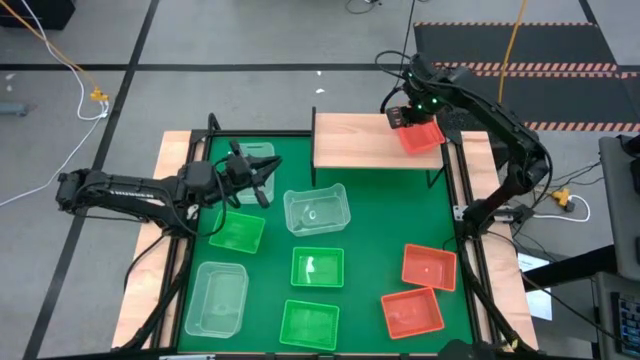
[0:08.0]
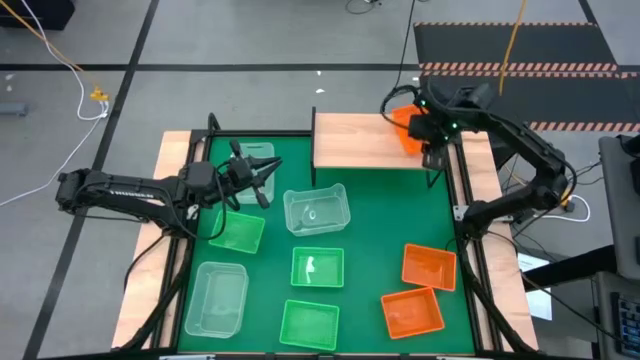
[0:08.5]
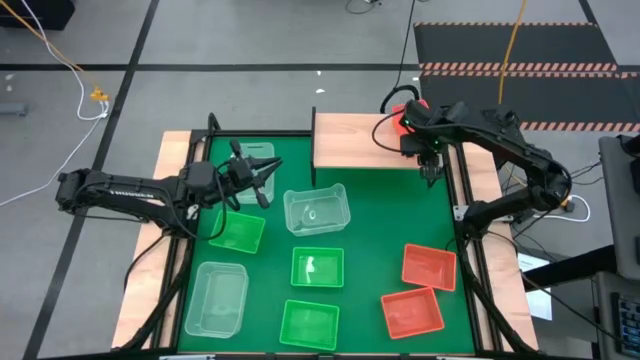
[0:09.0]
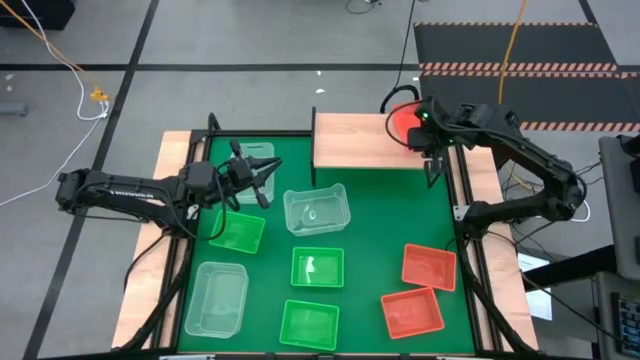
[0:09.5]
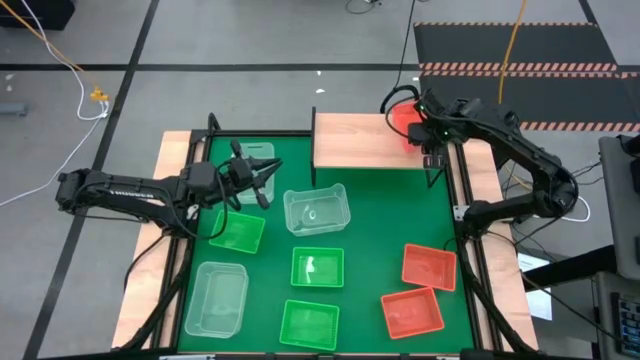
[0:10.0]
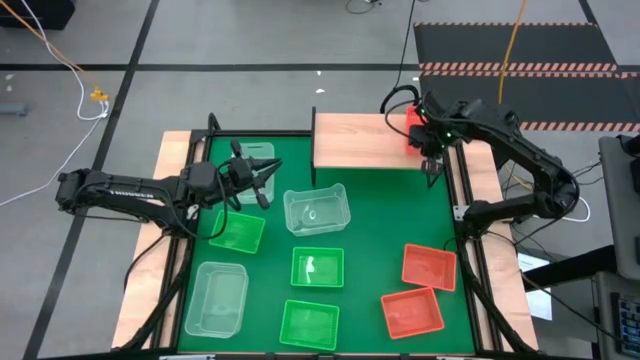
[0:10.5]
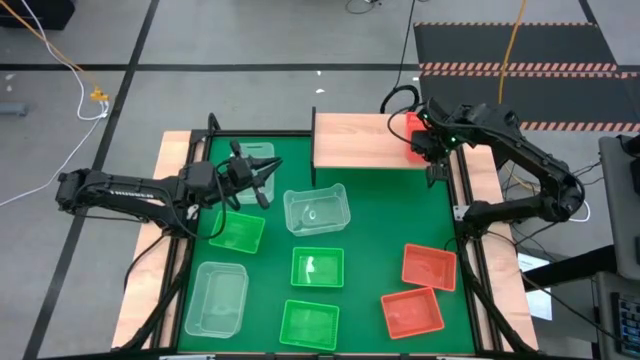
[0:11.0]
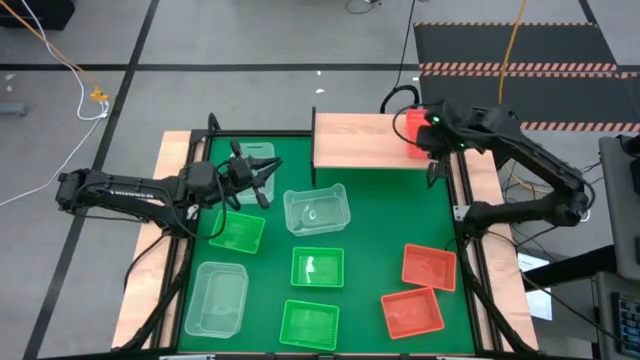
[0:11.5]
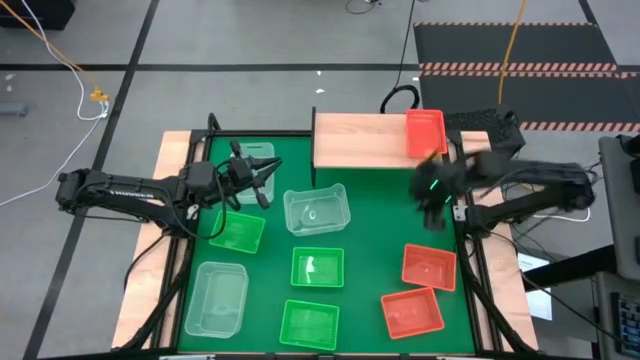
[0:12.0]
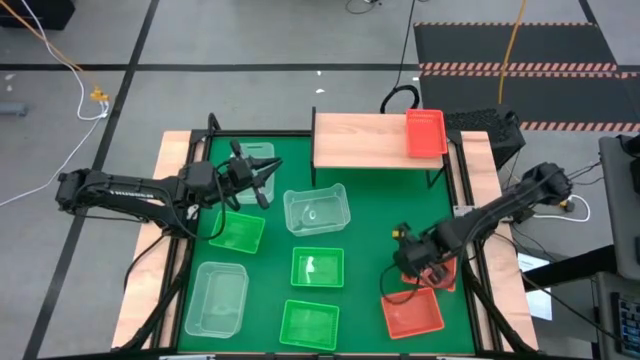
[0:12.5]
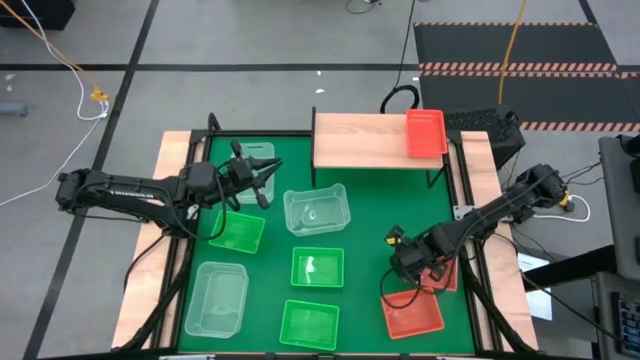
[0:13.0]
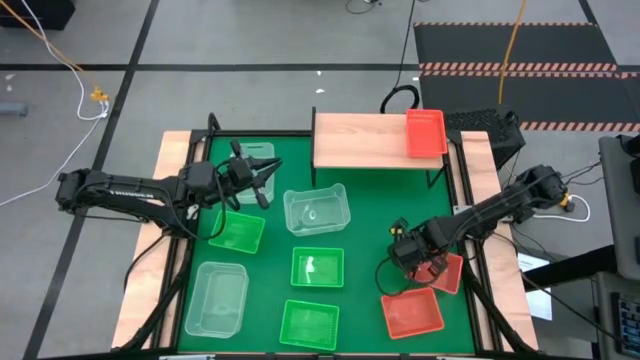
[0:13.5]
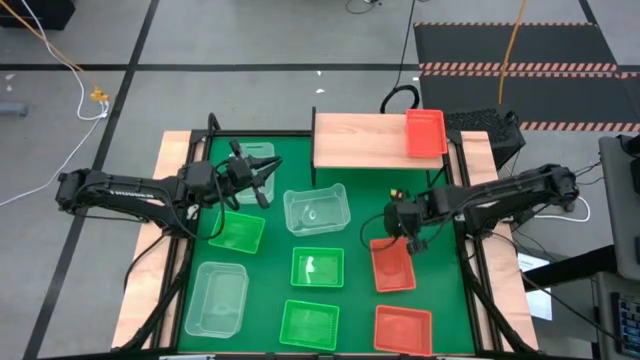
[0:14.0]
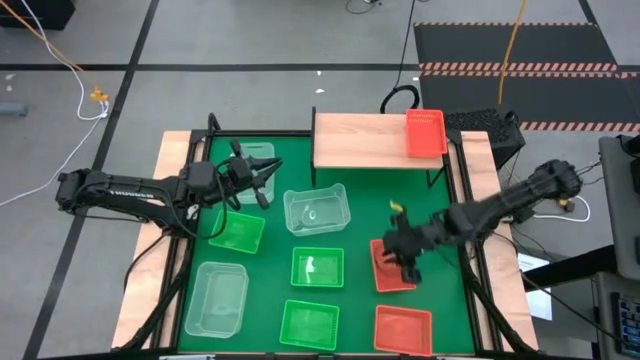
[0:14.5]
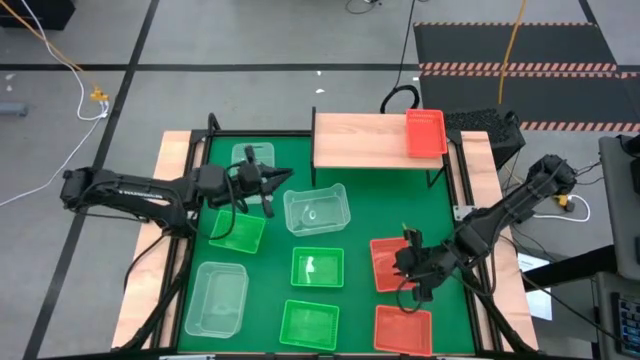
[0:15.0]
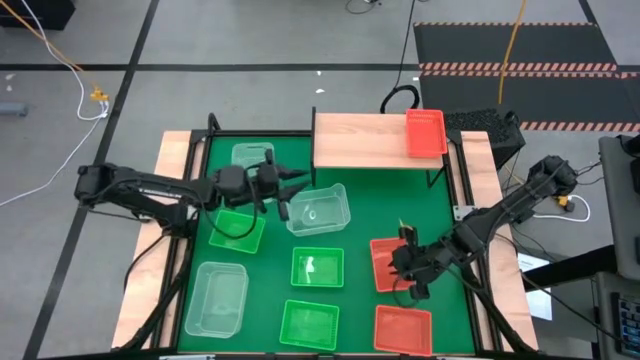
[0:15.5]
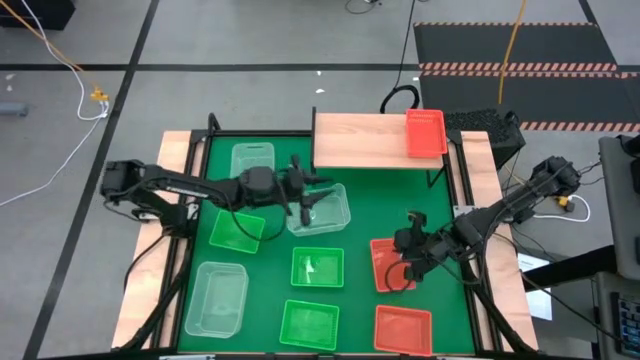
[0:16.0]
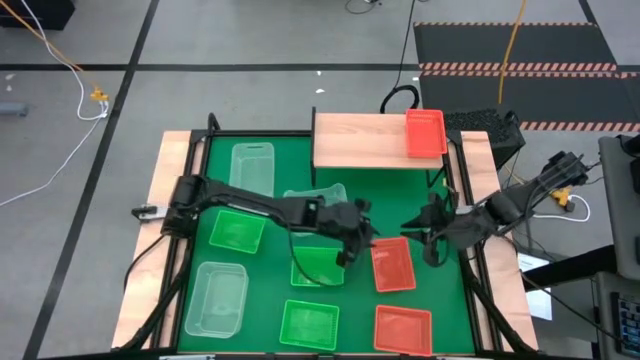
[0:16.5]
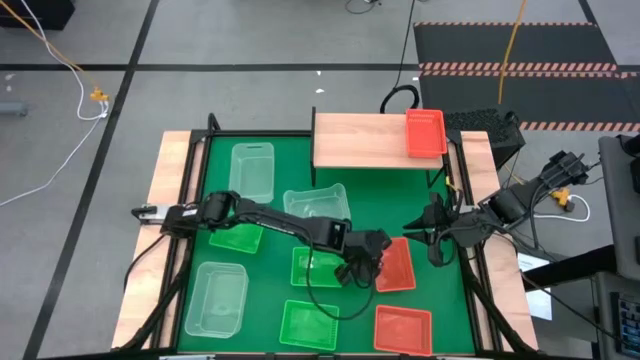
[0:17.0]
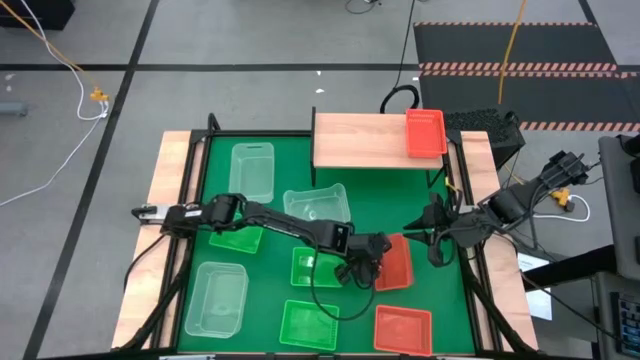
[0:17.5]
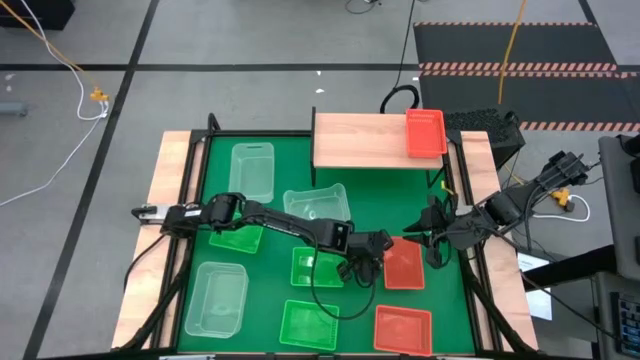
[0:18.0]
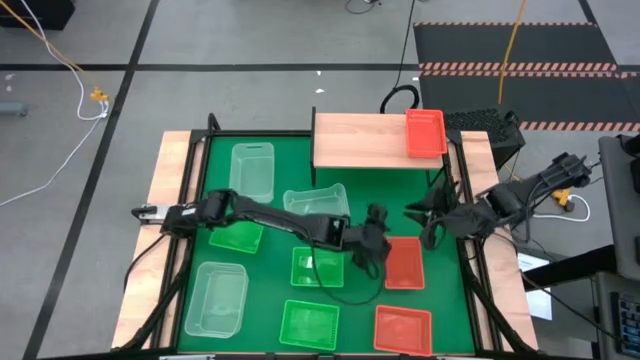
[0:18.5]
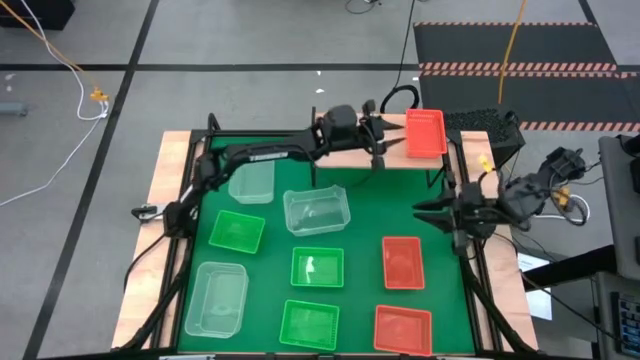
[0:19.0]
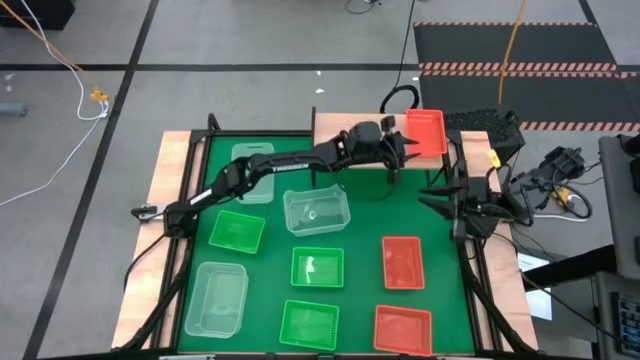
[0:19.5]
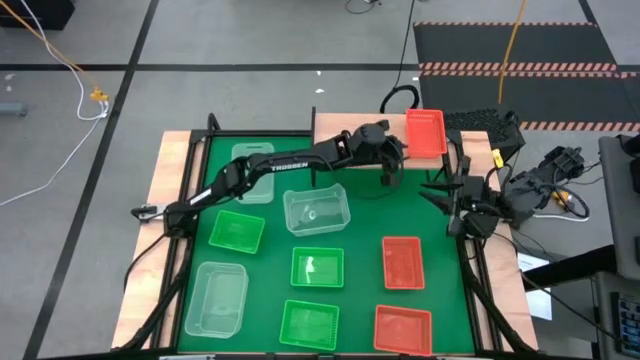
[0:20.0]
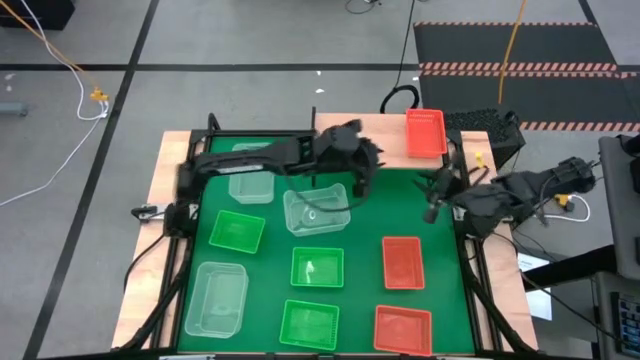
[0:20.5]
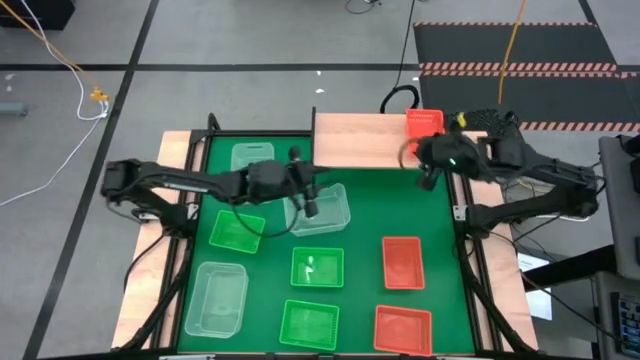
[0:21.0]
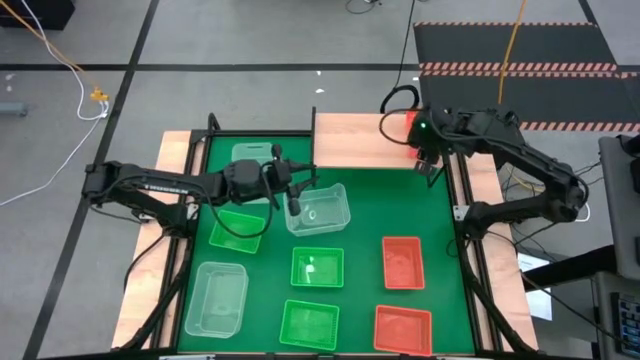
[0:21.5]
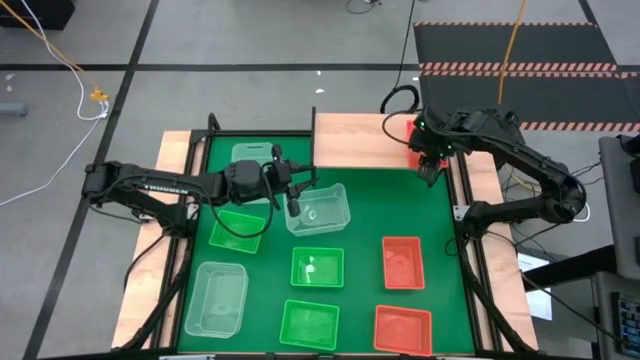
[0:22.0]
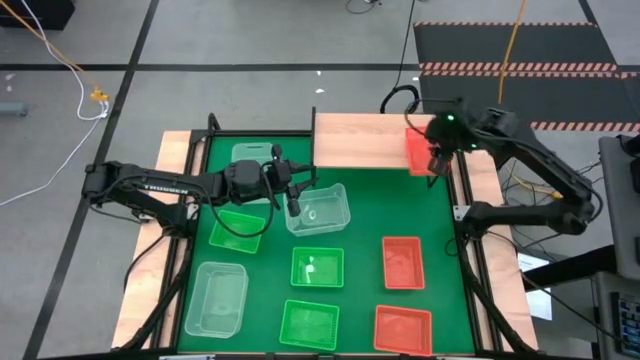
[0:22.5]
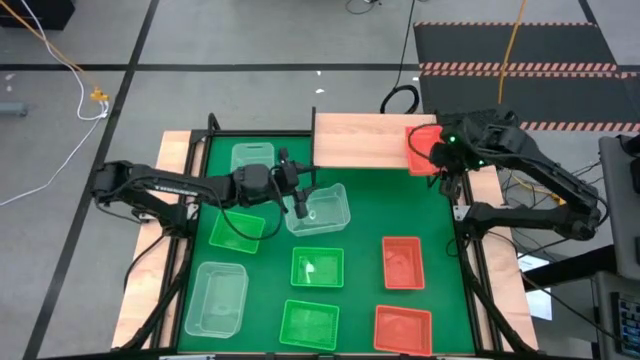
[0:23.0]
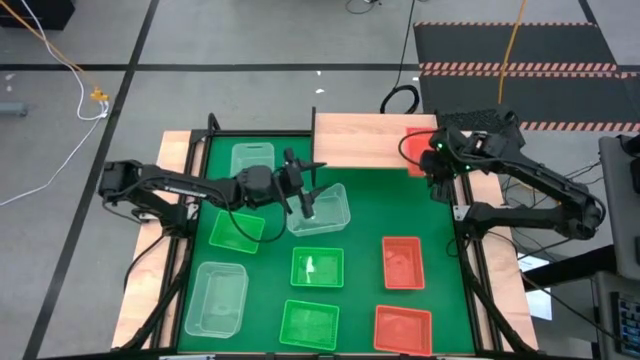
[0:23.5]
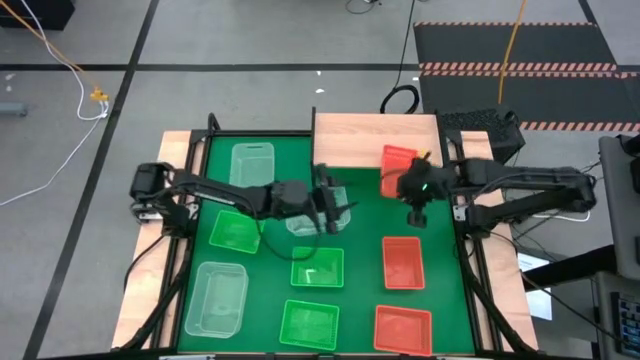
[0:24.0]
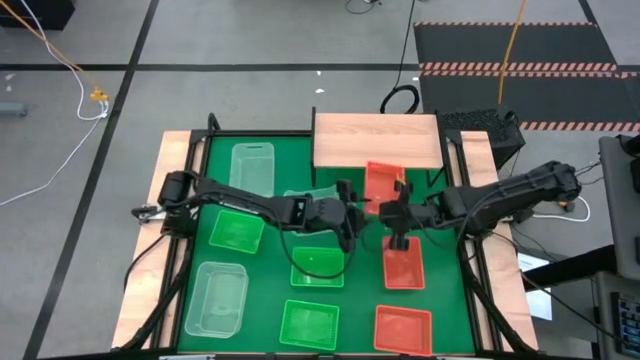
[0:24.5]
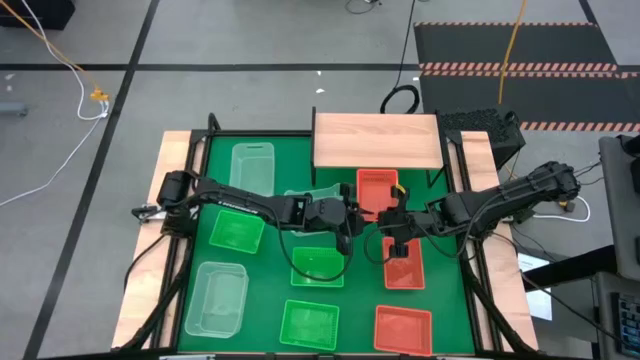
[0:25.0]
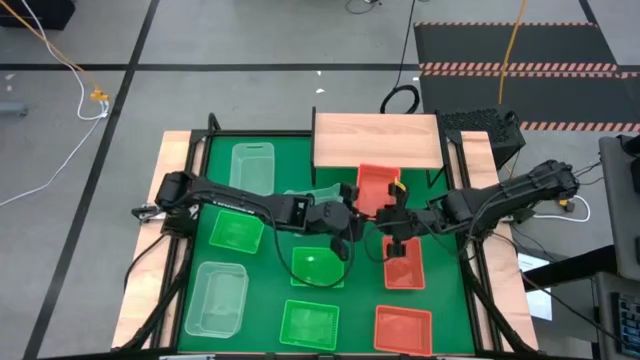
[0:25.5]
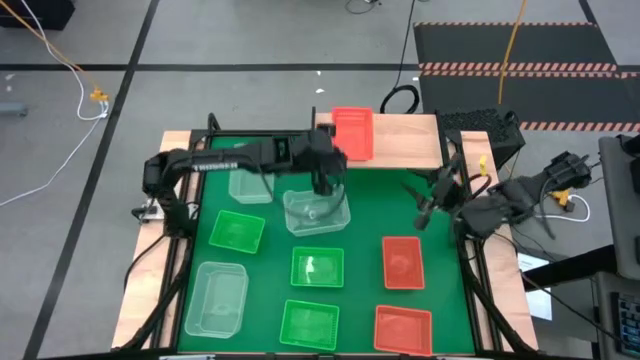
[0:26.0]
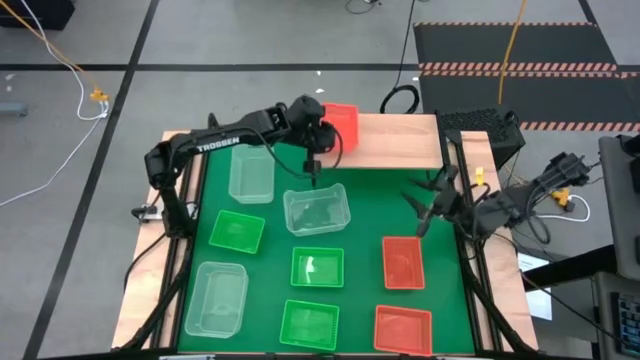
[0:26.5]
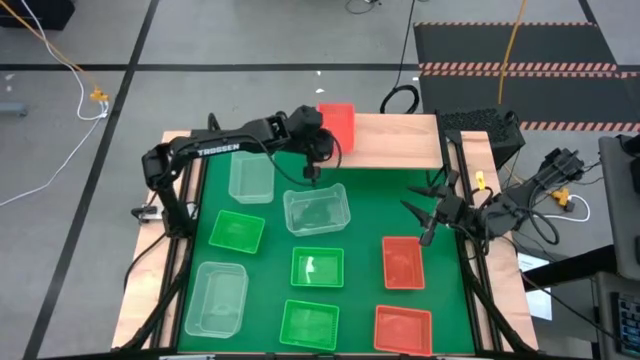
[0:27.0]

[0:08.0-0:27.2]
Task: Stack baskets on shelf by color
Adjust the orange bin on the shelf
